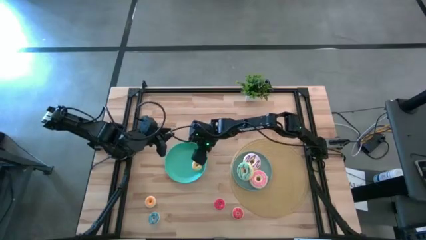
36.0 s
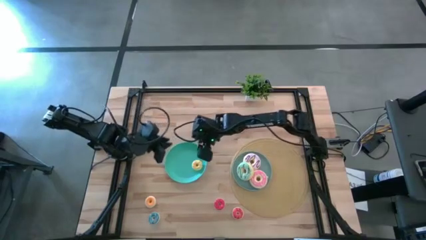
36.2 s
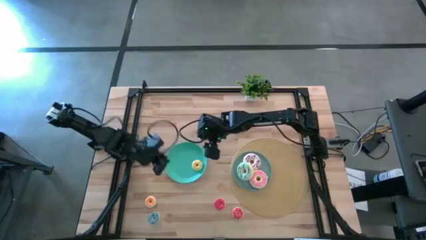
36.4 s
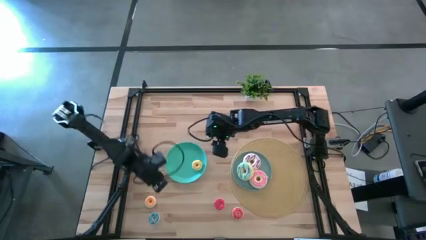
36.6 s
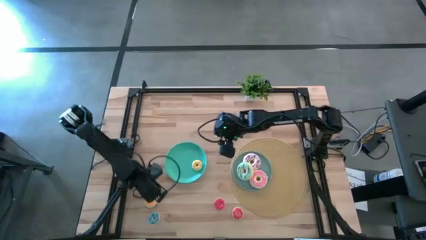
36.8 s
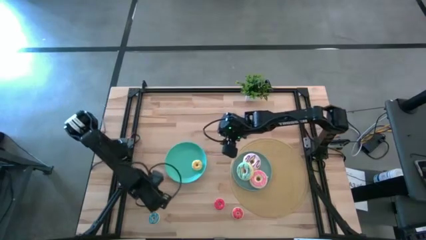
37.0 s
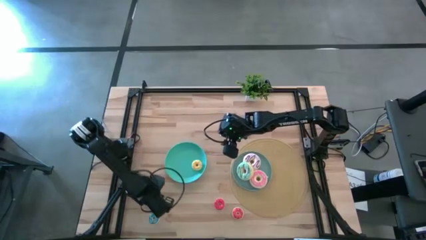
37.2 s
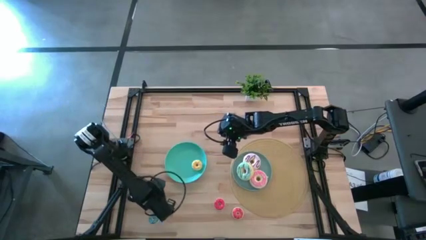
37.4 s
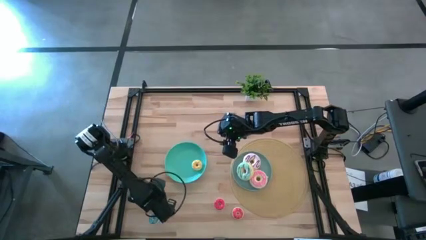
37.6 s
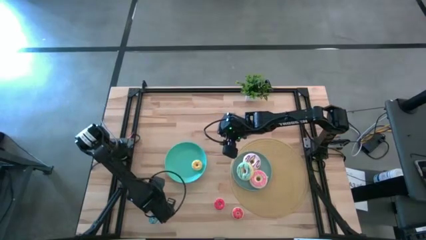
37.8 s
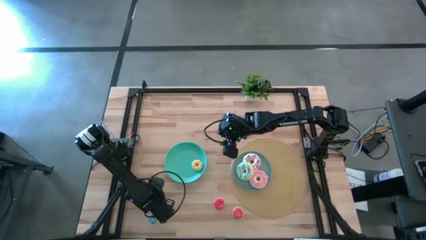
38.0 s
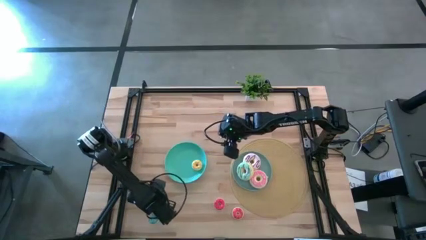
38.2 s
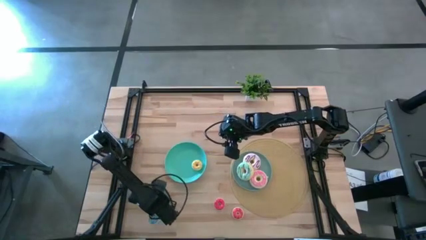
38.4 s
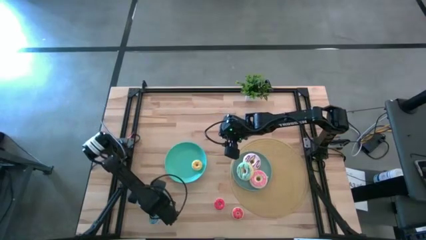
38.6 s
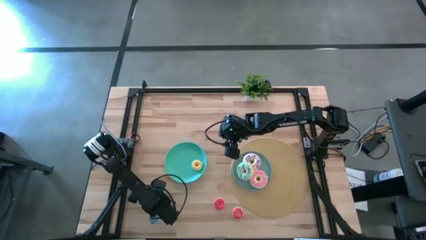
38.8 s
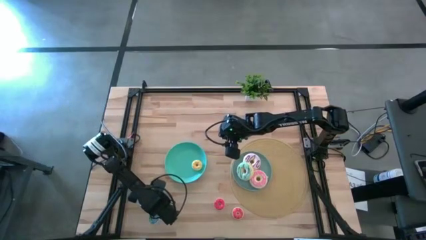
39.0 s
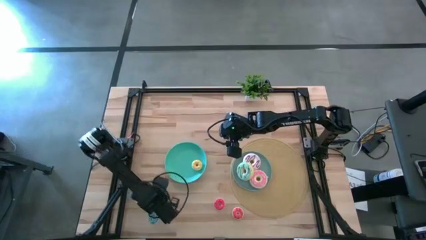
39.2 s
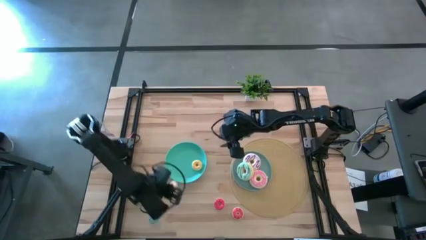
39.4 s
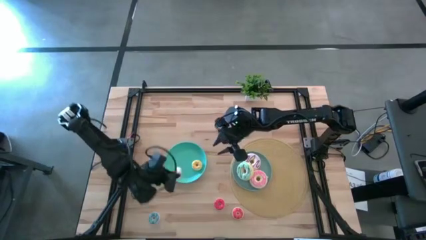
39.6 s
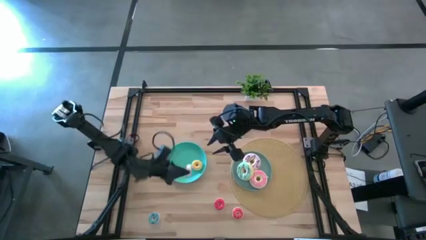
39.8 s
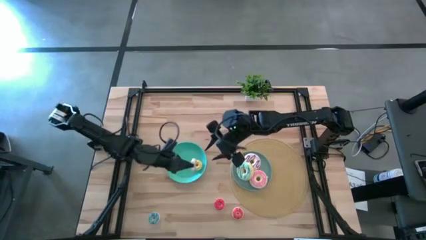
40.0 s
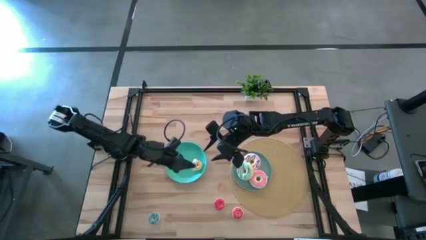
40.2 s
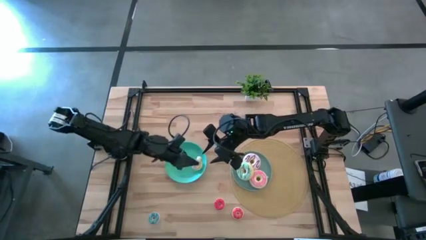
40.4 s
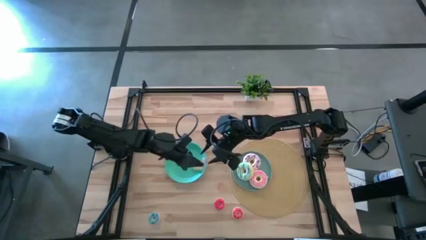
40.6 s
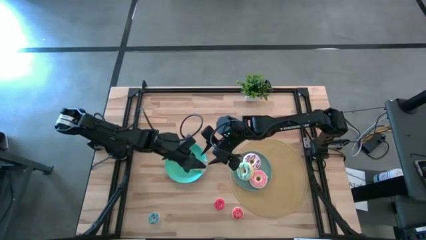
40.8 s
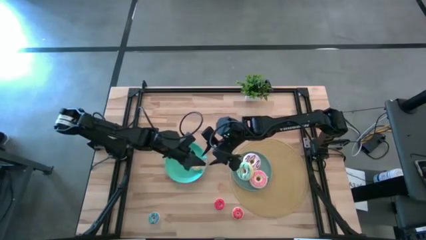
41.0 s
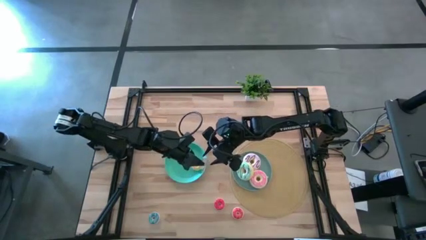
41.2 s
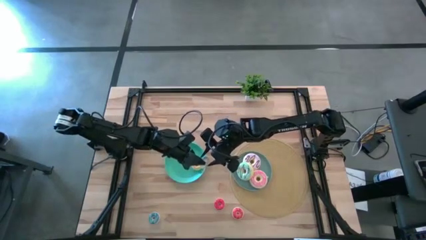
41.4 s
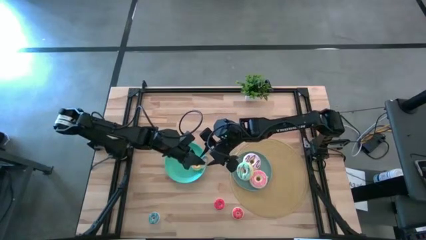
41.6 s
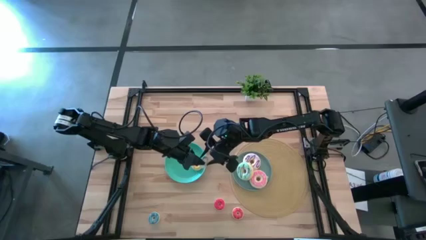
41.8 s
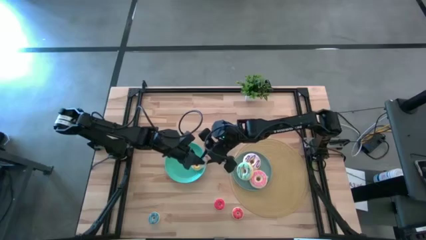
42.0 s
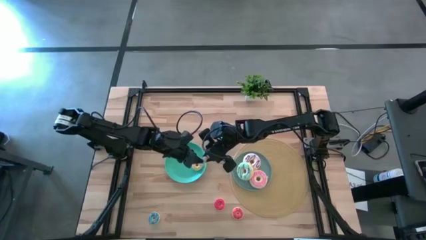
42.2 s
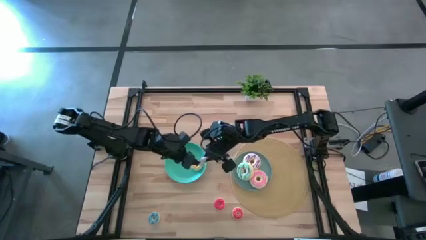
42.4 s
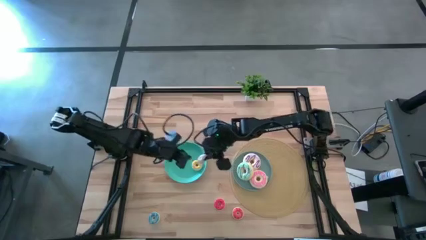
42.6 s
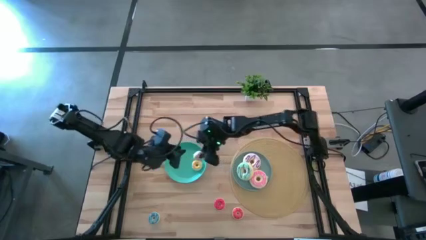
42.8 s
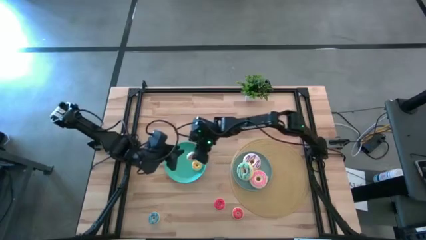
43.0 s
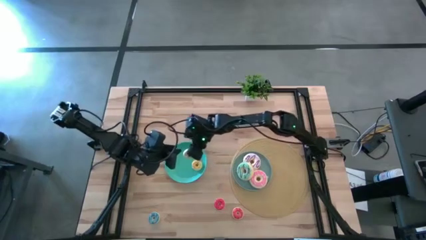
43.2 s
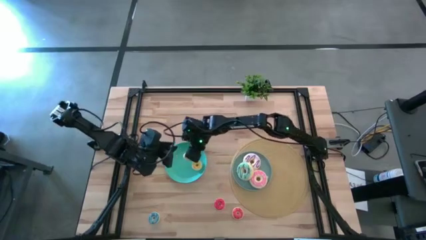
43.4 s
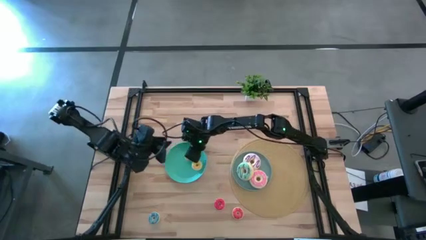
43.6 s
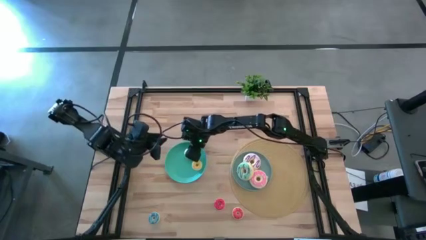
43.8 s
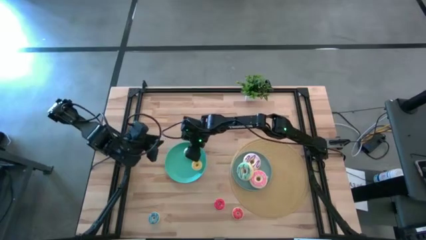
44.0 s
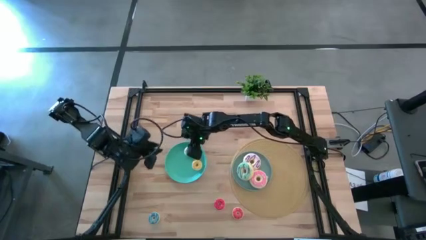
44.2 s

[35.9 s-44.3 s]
Task: Pick & Place donuts
Put the small white donut on the light blue plate

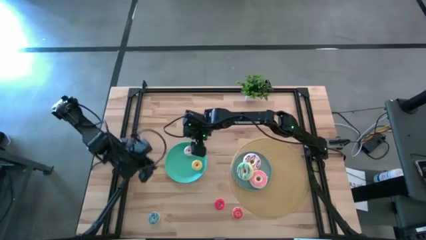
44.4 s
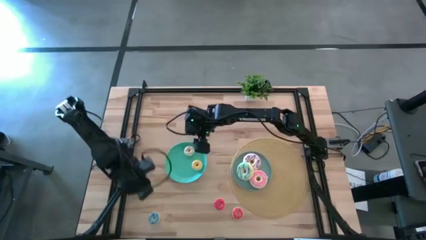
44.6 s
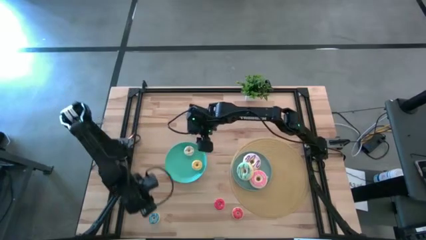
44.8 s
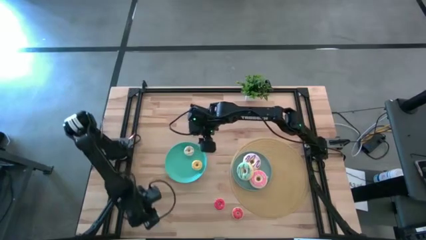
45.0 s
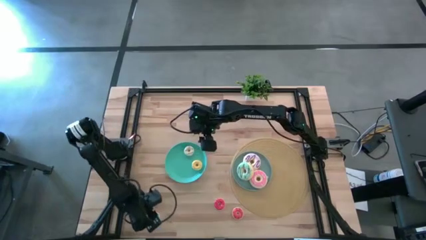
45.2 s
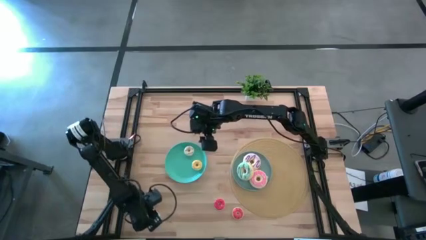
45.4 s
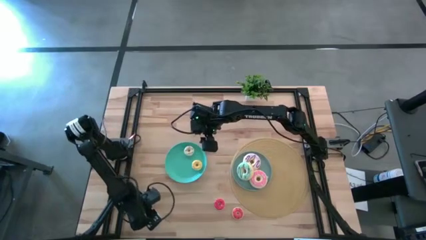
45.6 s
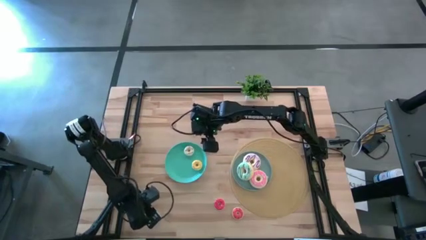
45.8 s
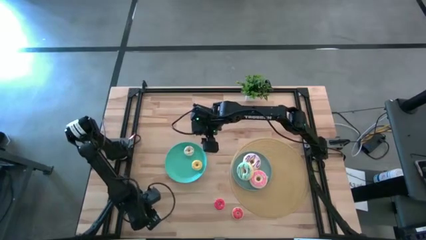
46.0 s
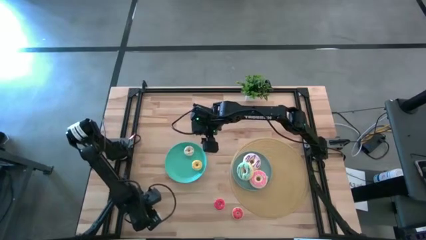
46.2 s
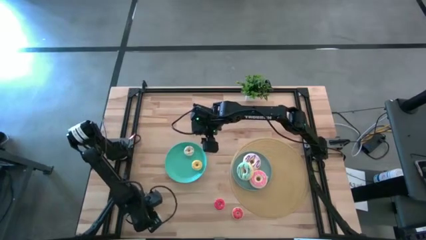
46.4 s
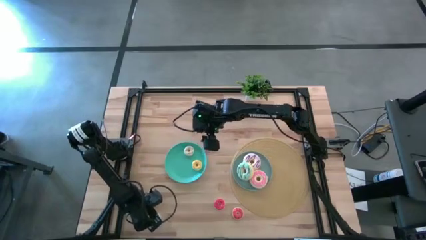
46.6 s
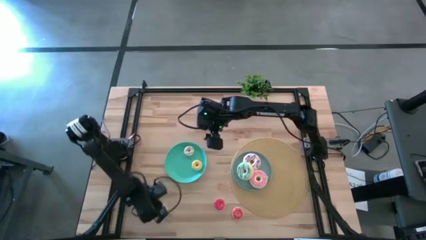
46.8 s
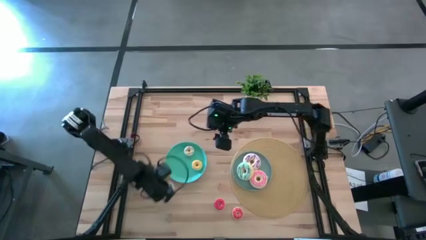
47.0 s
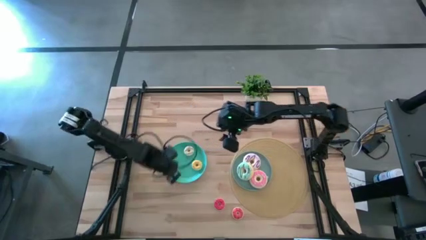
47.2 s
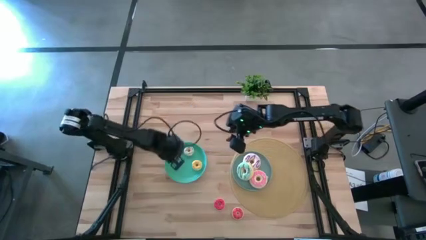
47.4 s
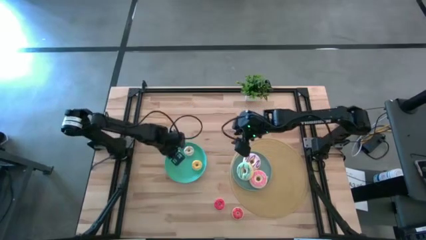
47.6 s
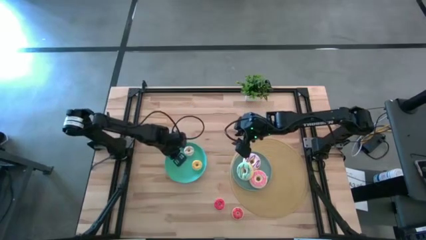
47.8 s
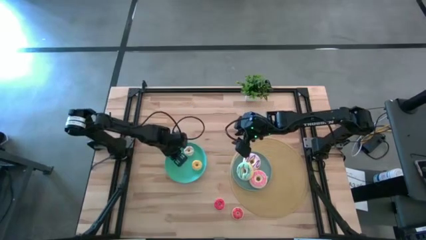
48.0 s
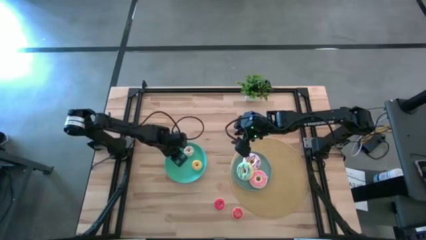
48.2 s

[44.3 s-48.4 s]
Put the small blue donut on the light blue plate

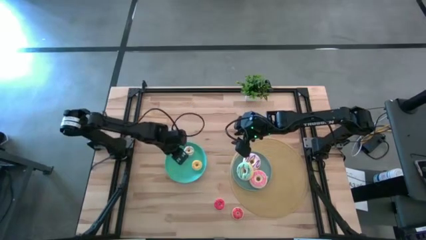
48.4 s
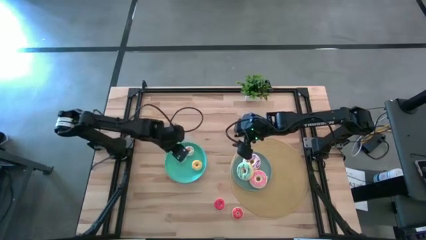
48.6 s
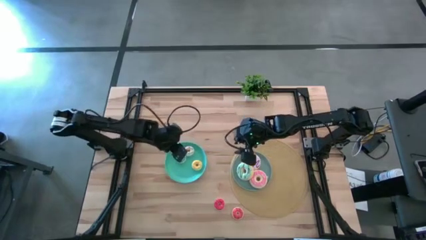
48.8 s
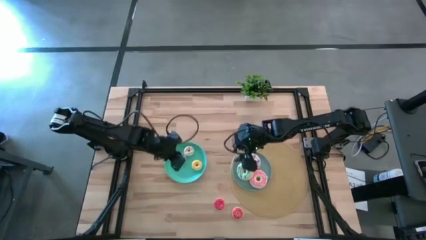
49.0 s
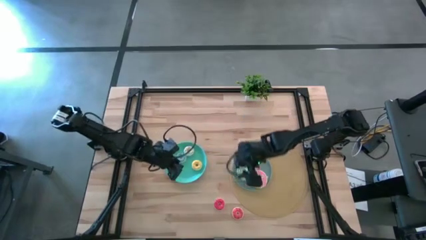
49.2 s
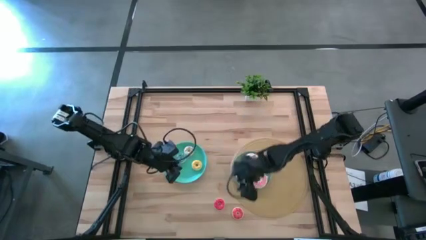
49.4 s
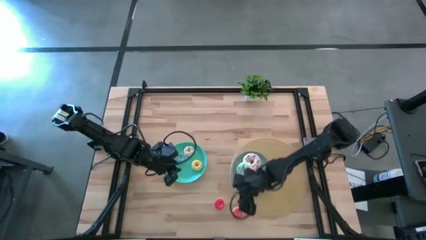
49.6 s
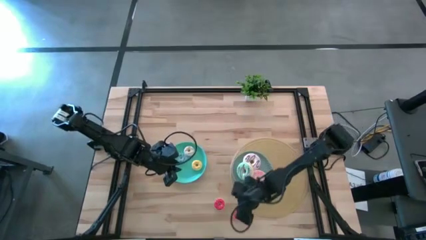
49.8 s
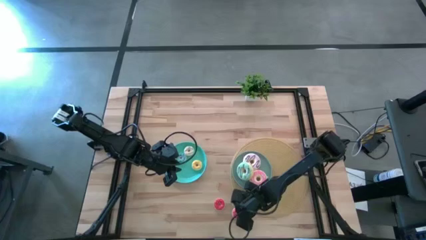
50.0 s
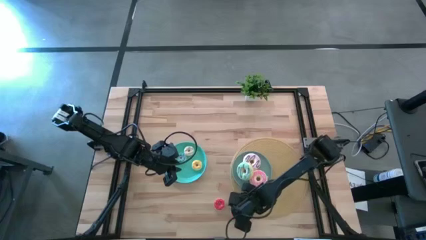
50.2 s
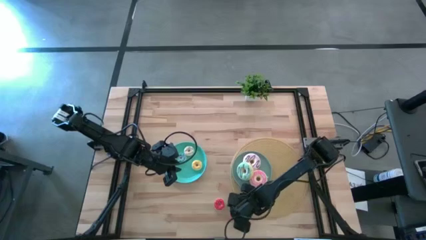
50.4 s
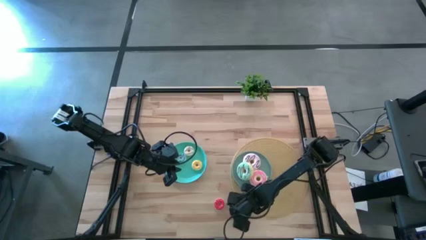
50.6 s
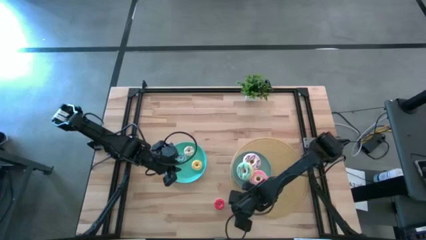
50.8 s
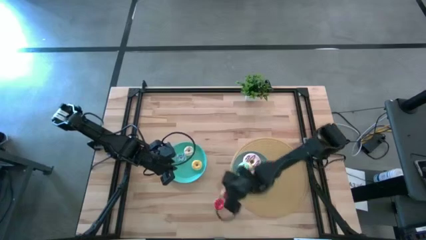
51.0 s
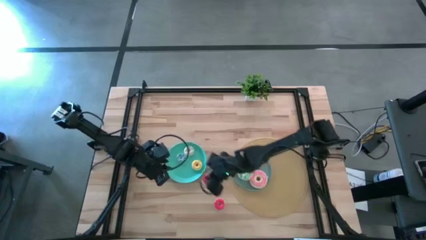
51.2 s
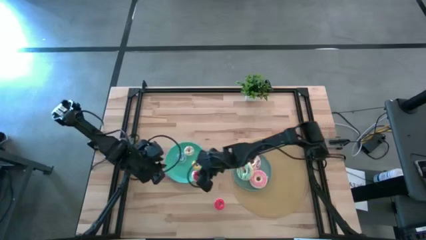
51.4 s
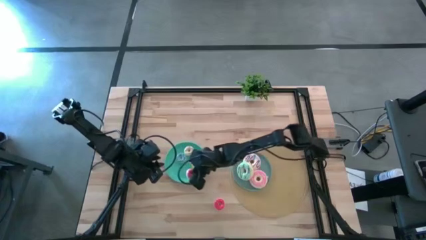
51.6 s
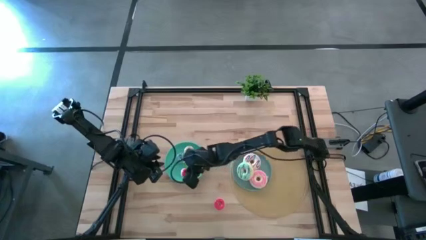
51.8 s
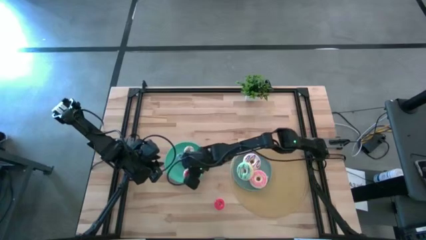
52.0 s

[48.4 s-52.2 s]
Put the small orange donut on the light blue plate

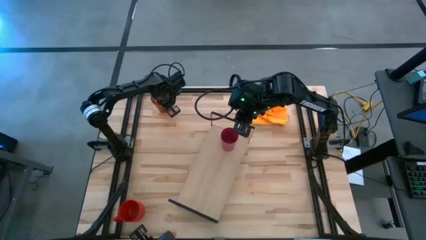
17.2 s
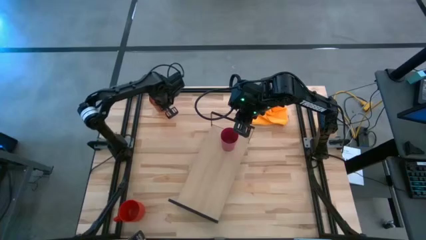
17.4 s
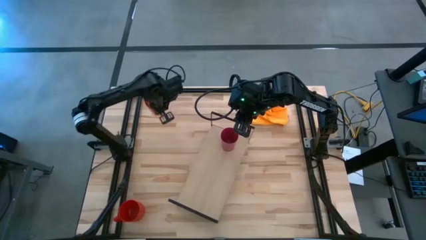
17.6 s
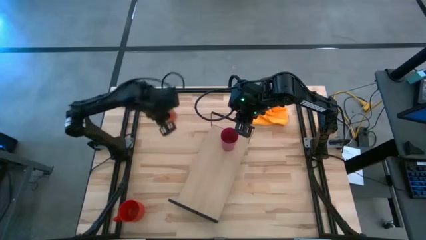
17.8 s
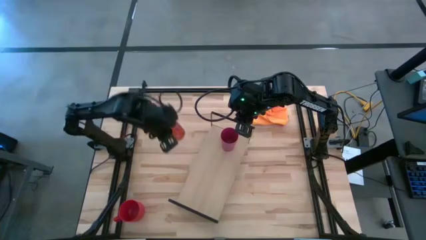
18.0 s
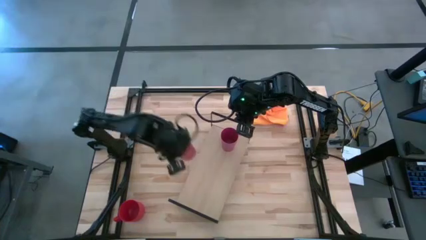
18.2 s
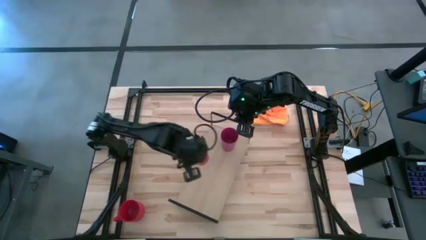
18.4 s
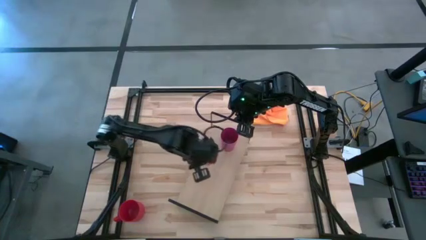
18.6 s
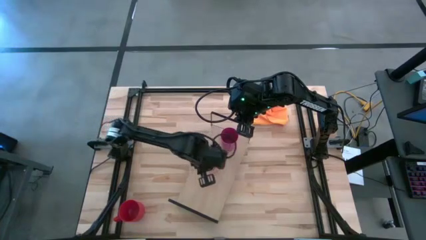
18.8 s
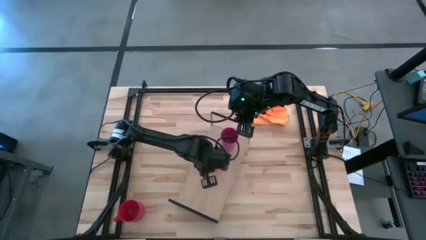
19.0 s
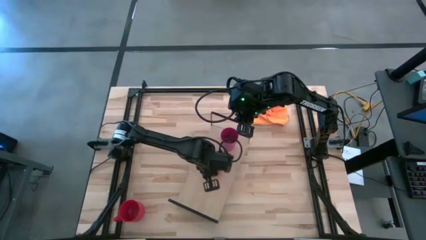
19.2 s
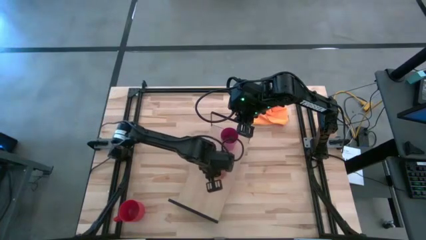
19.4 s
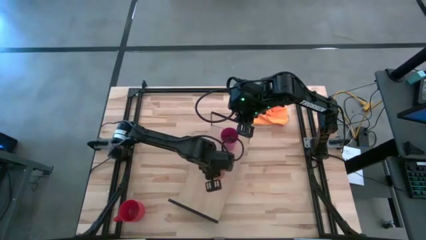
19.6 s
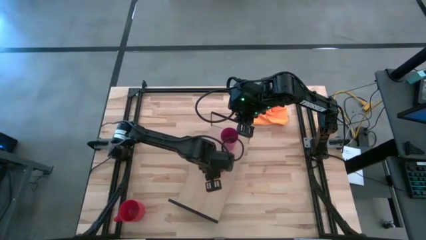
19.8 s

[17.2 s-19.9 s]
Task: Stack small to large cups/mugs on shelf
Put the orange glass cup on the shelf
